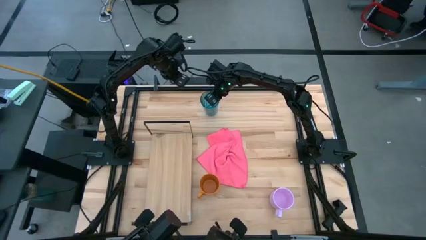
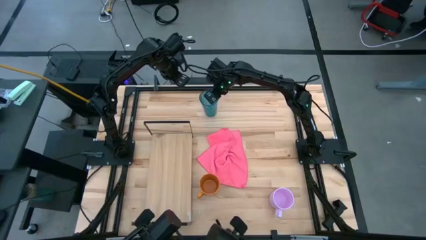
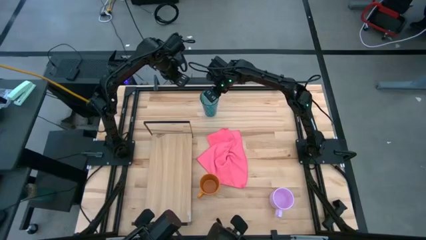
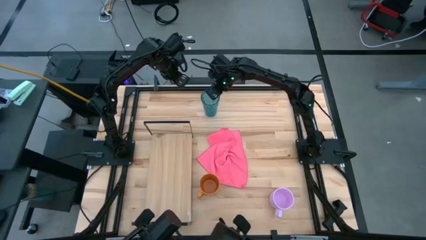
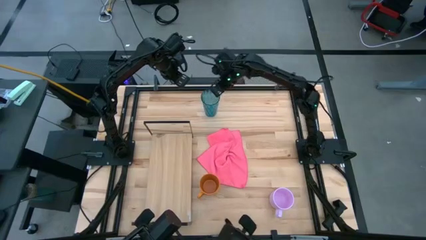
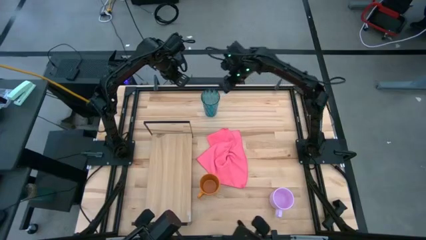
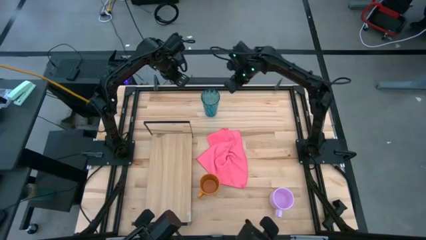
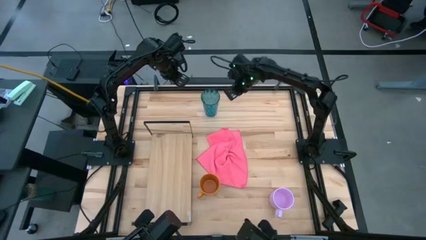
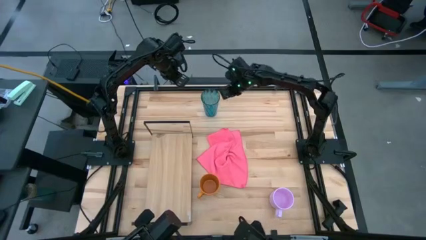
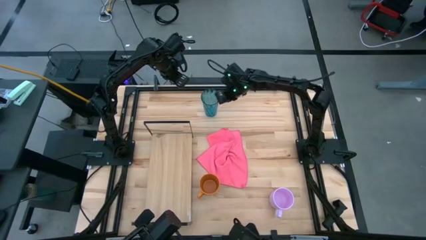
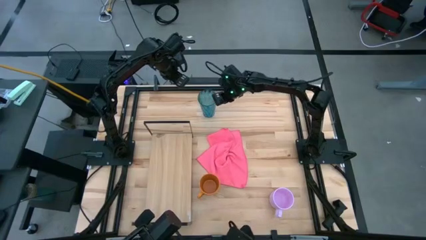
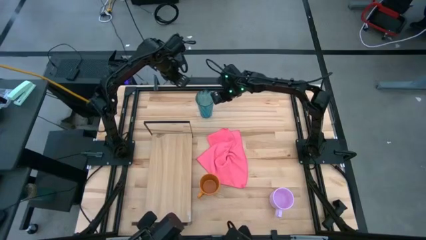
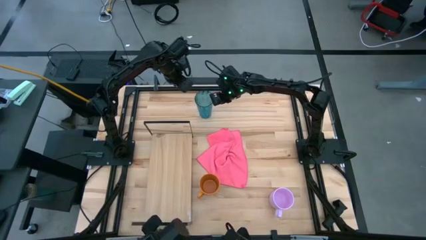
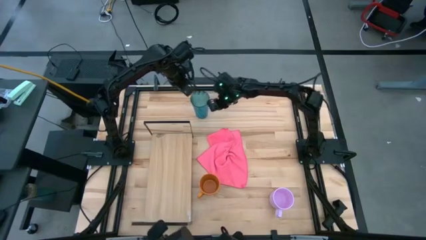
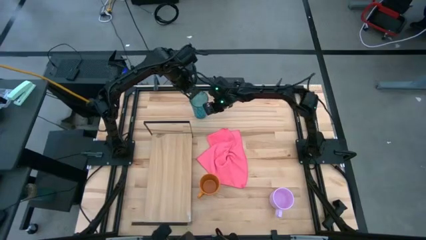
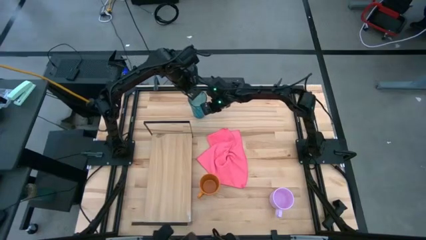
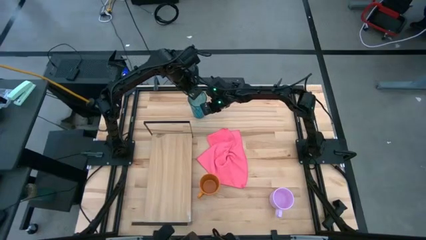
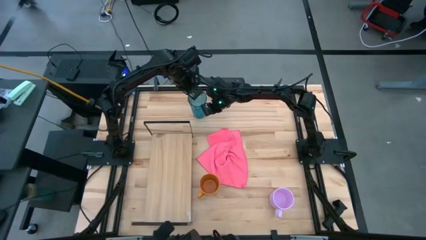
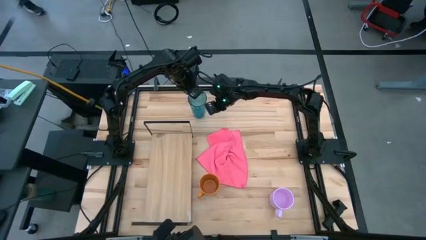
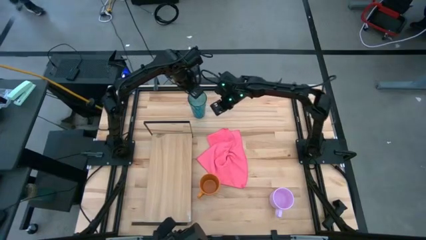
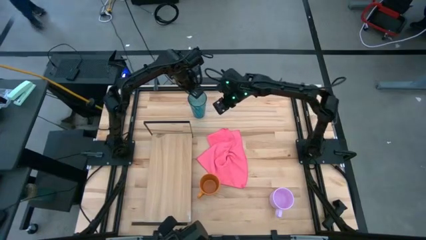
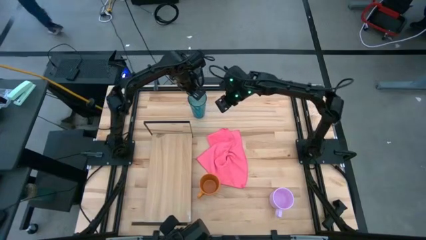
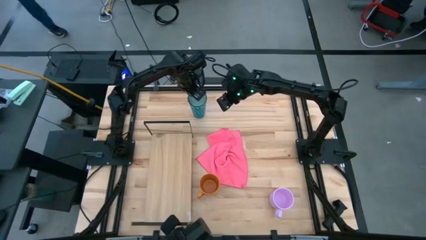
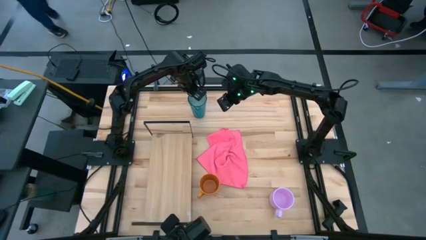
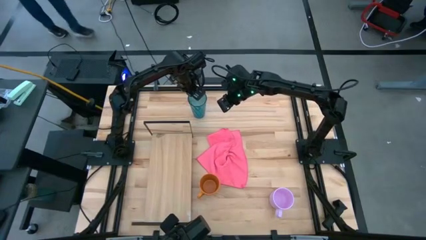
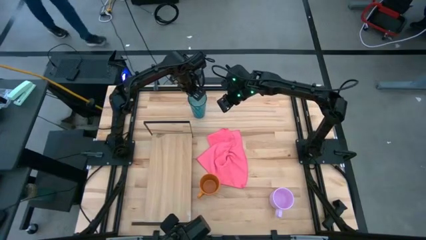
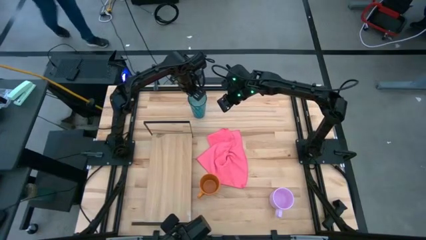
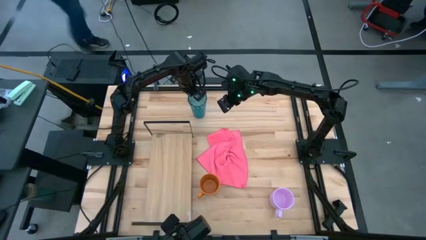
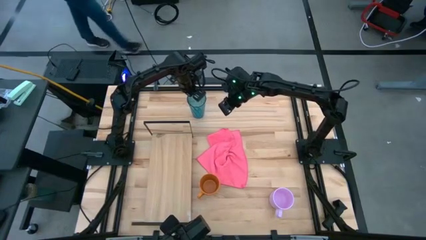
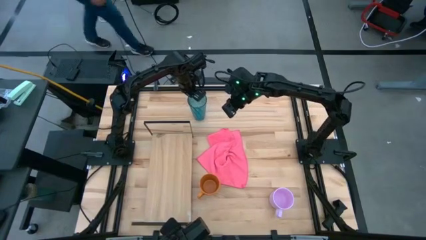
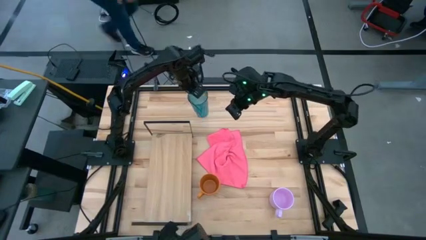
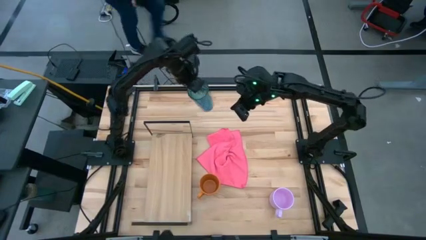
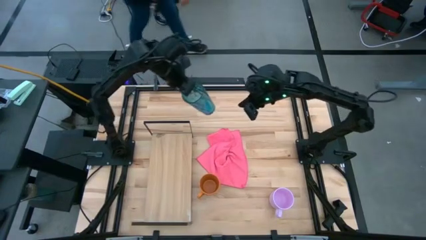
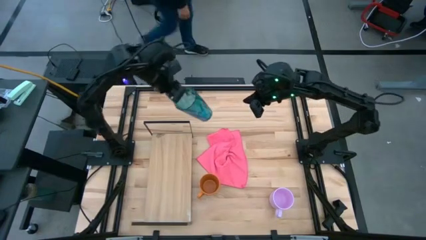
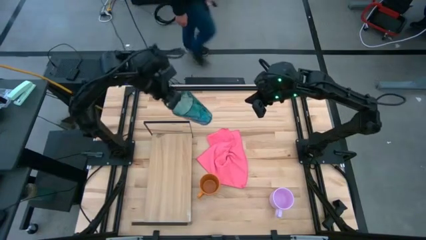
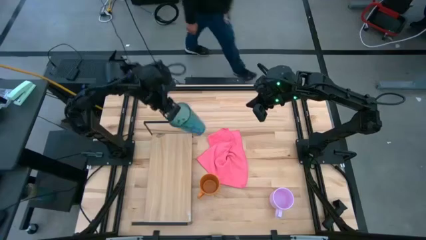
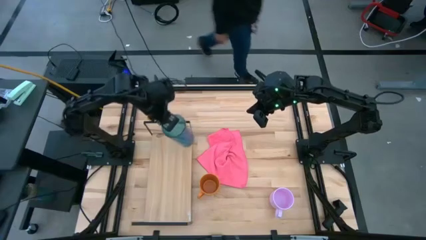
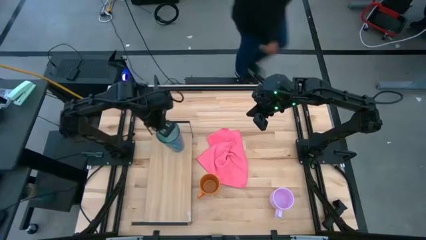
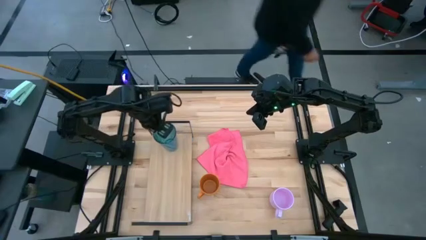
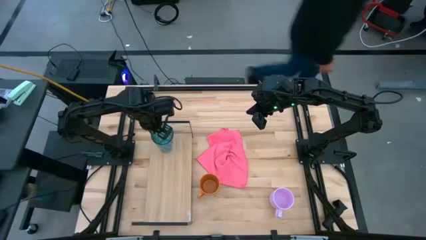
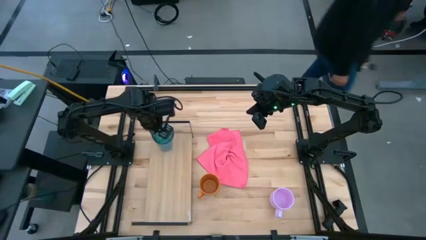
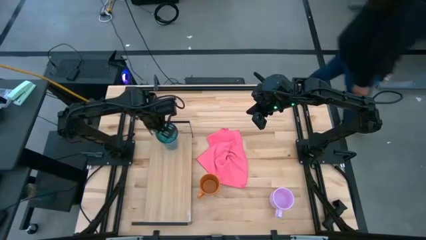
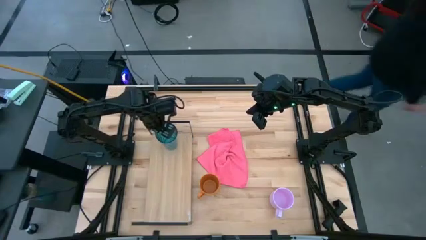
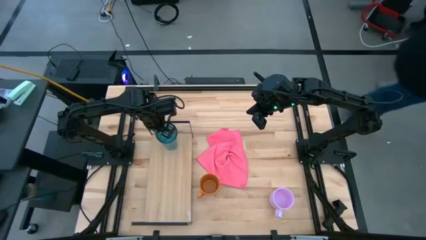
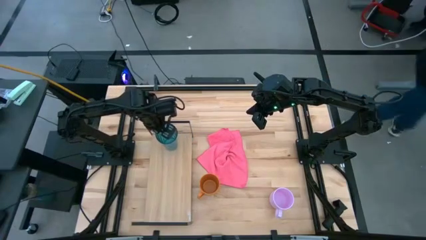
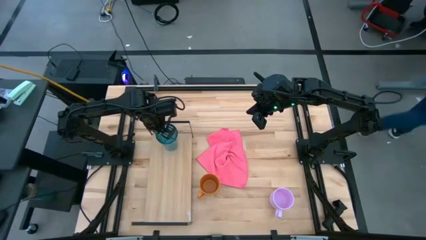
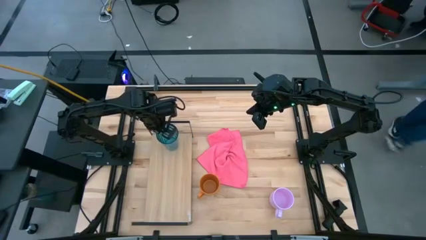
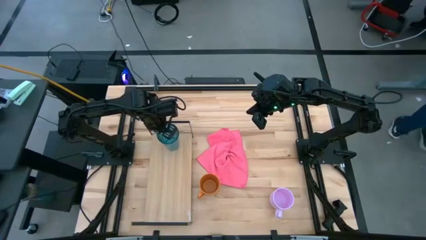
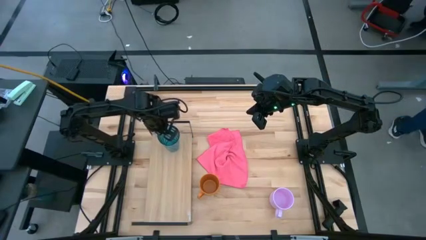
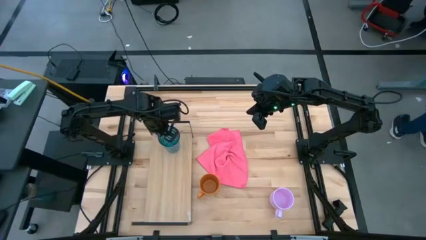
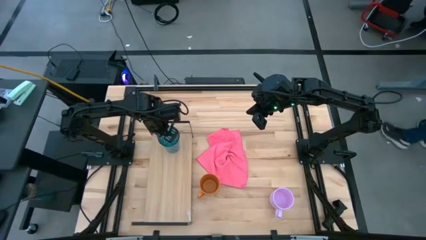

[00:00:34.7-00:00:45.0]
Task: Stack small to large cups/mugs on shelf
Put the blue glass on the shelf

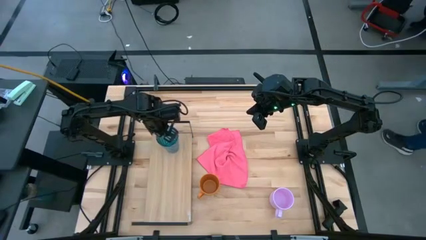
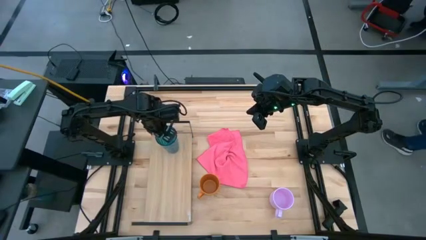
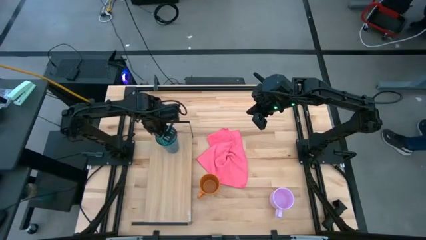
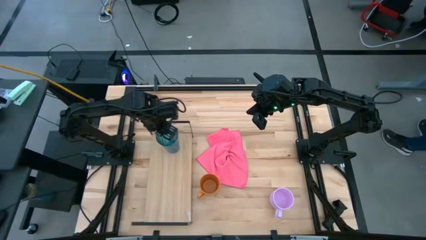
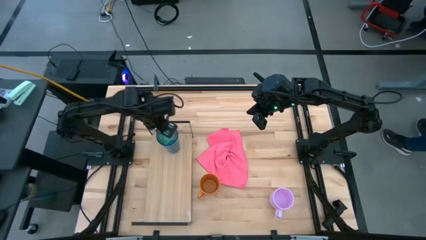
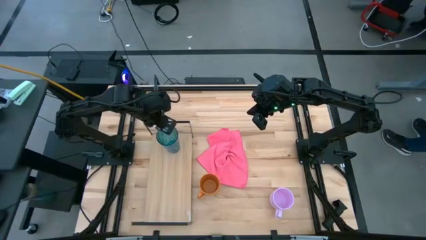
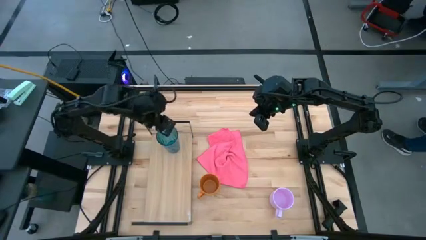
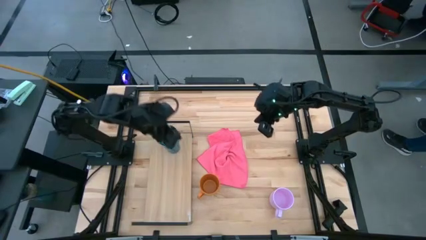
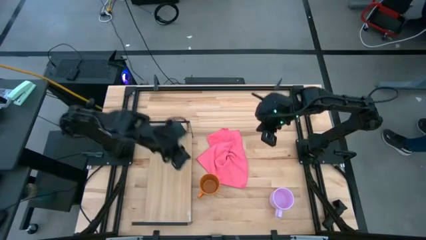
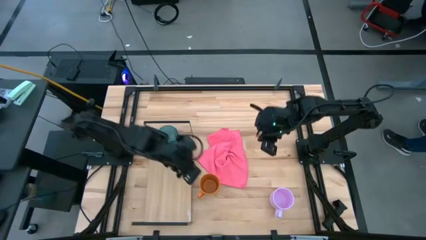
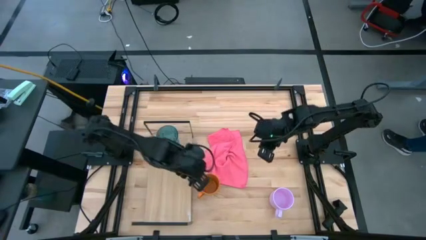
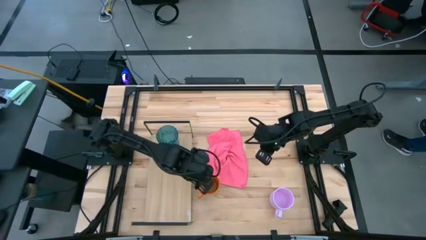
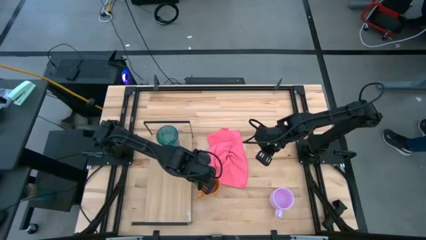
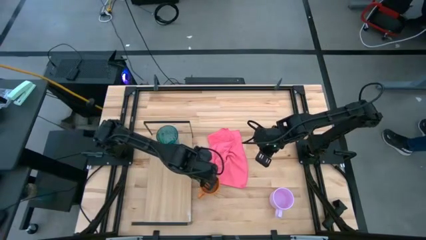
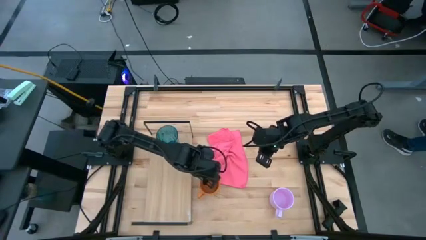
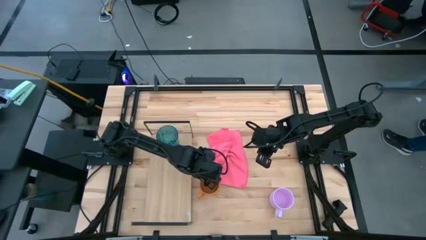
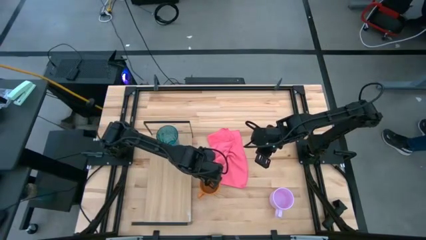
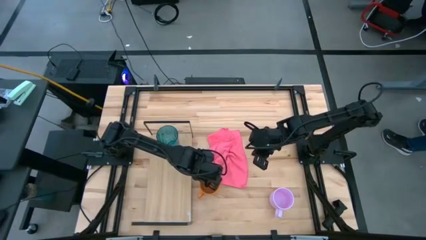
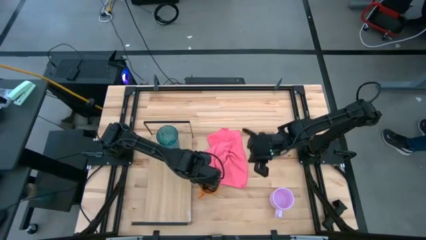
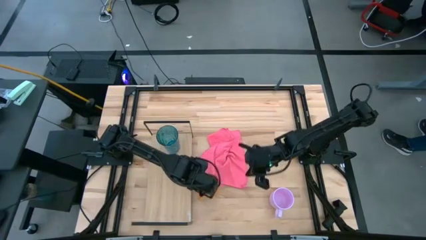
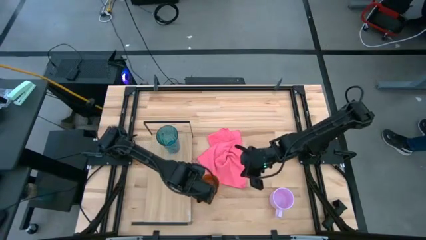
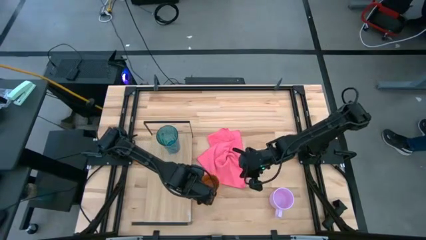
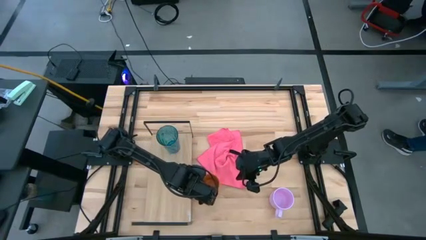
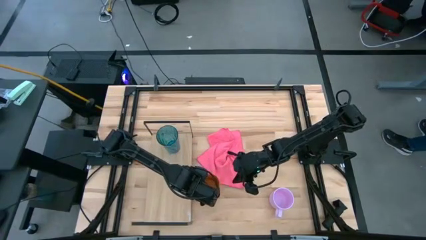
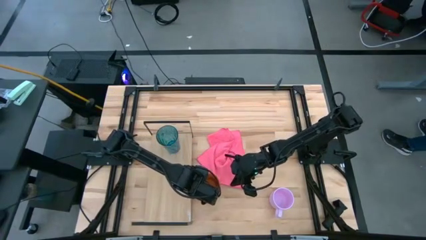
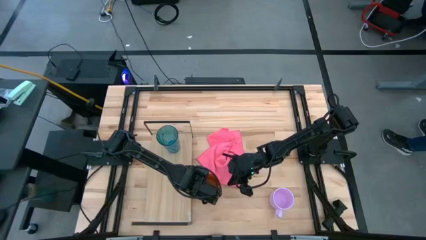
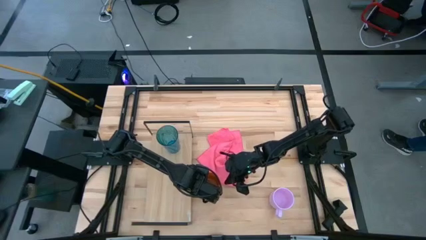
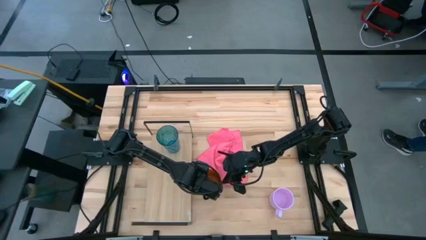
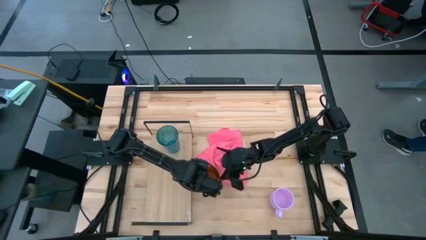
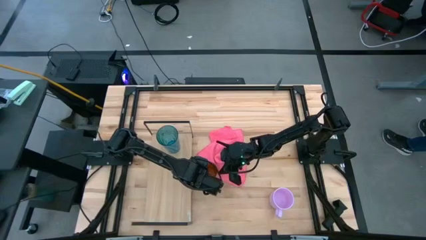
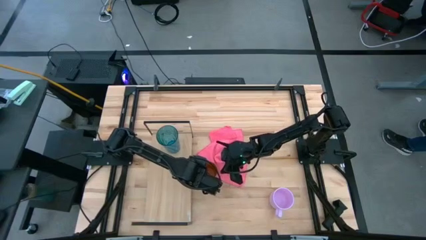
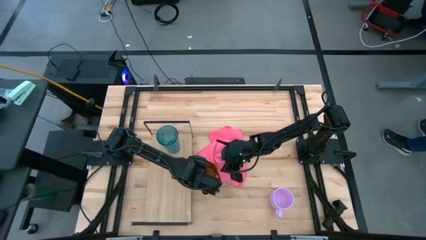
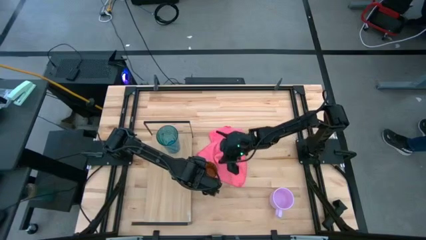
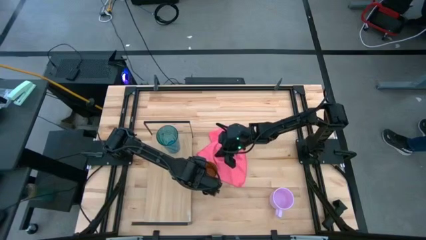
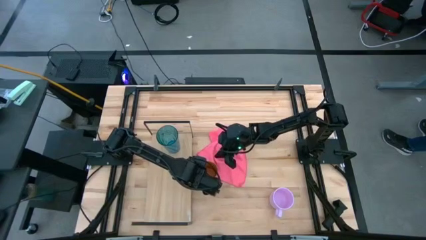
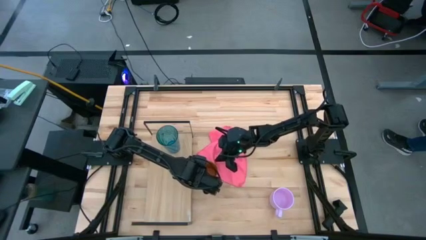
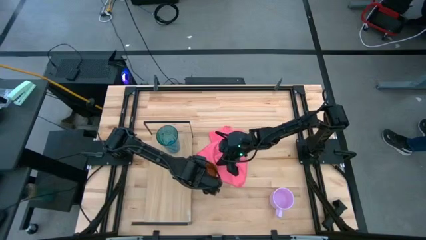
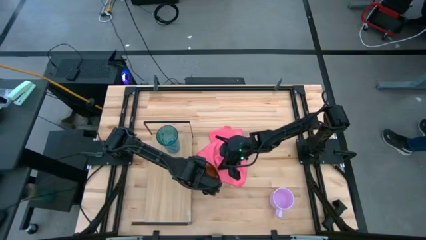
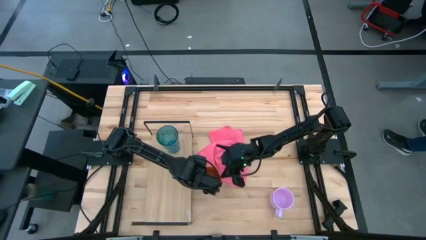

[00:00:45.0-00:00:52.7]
Adjust the center orange cup
